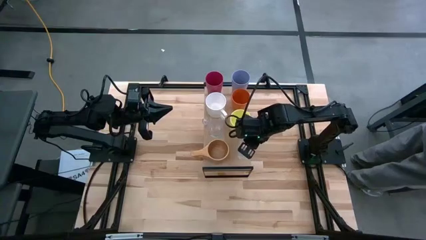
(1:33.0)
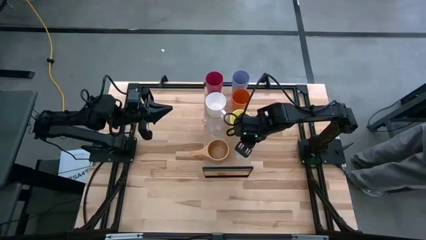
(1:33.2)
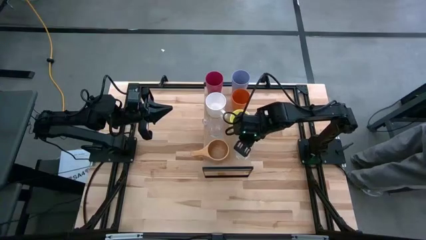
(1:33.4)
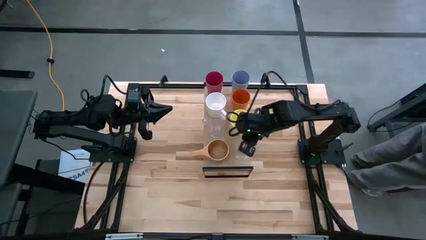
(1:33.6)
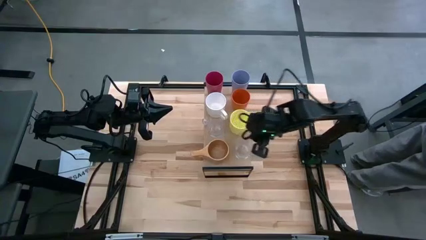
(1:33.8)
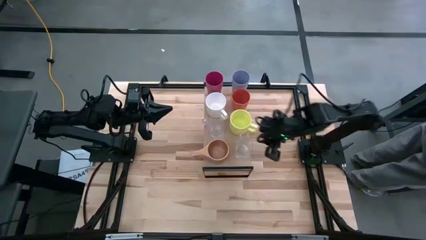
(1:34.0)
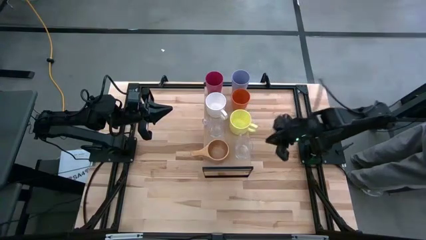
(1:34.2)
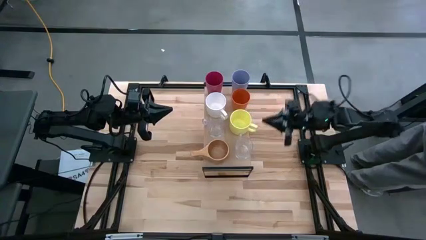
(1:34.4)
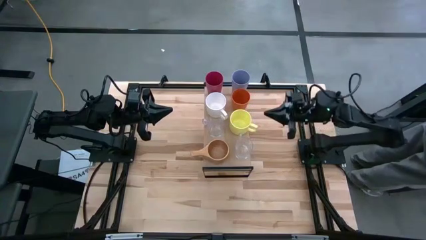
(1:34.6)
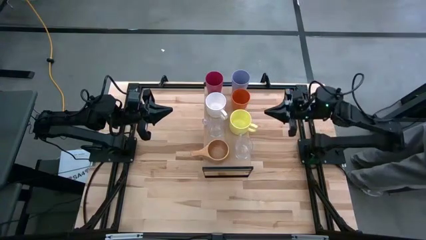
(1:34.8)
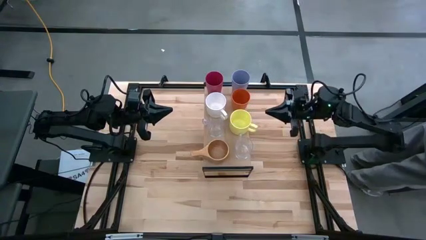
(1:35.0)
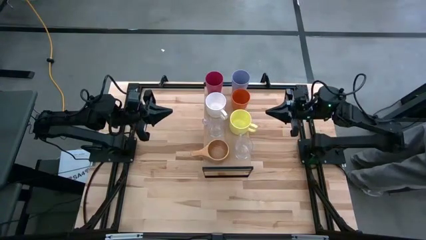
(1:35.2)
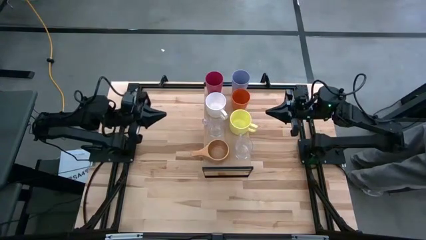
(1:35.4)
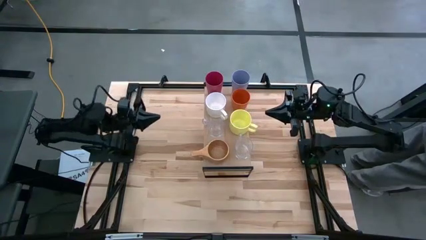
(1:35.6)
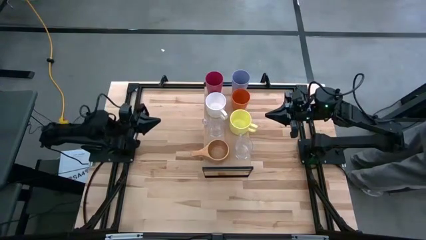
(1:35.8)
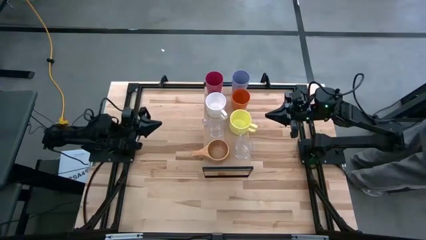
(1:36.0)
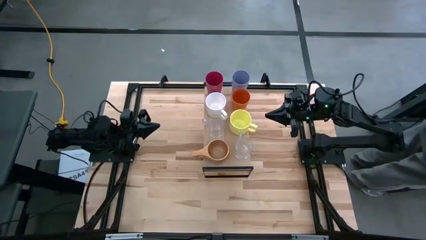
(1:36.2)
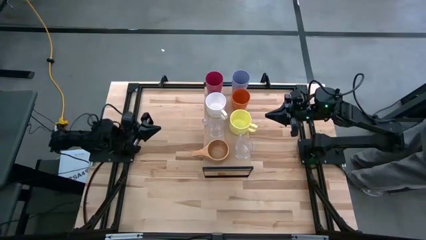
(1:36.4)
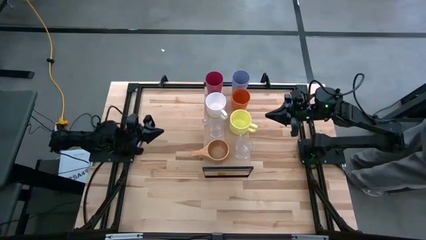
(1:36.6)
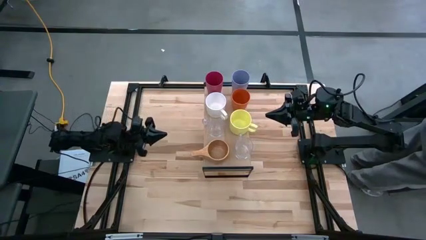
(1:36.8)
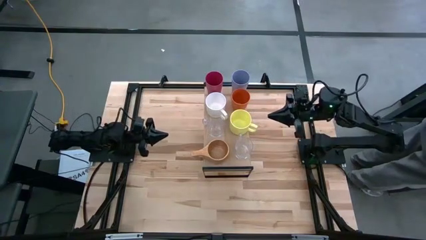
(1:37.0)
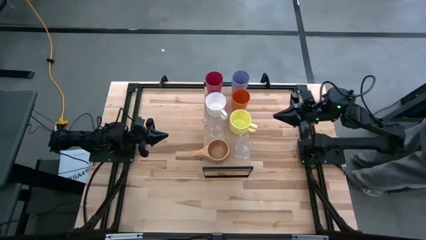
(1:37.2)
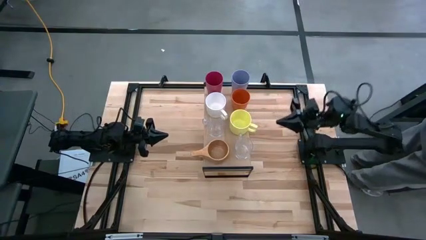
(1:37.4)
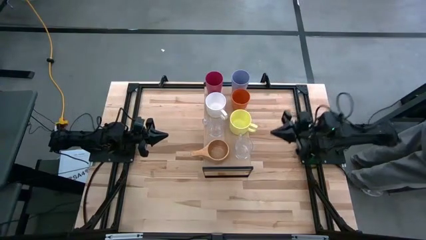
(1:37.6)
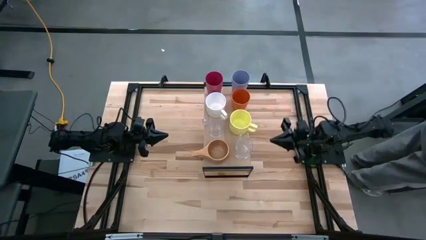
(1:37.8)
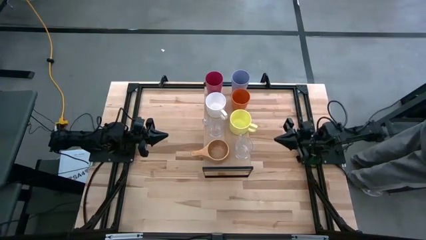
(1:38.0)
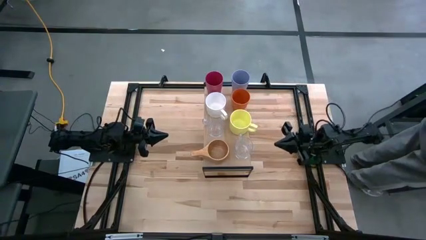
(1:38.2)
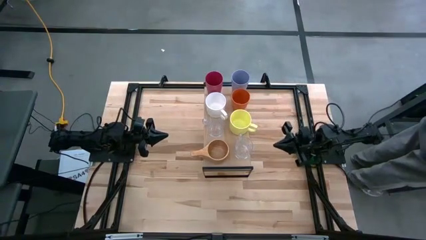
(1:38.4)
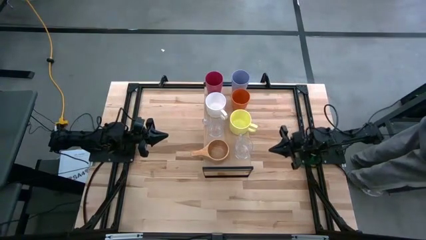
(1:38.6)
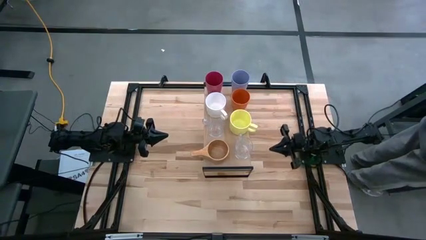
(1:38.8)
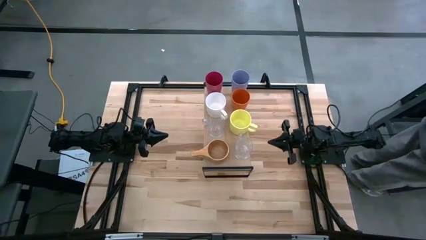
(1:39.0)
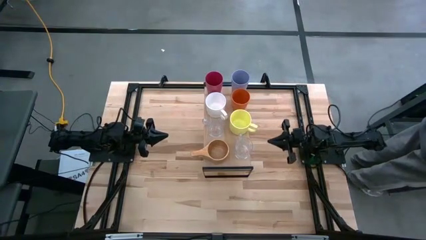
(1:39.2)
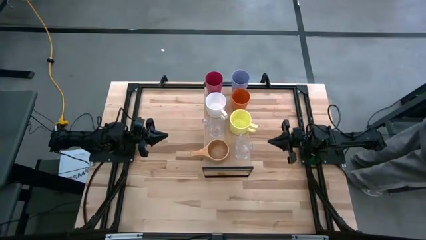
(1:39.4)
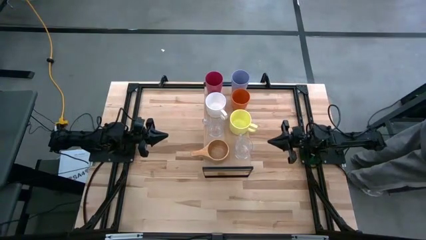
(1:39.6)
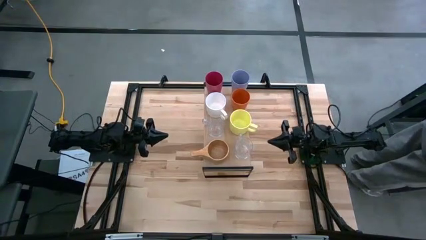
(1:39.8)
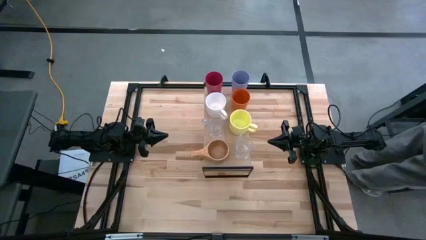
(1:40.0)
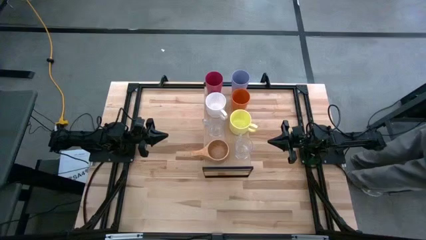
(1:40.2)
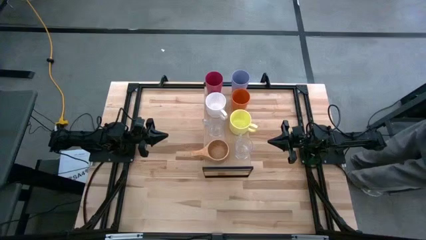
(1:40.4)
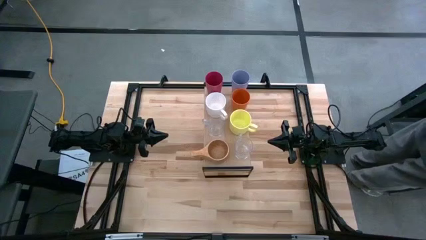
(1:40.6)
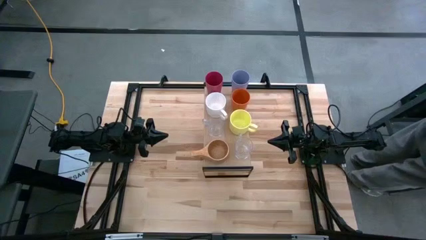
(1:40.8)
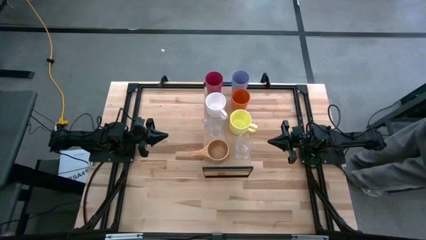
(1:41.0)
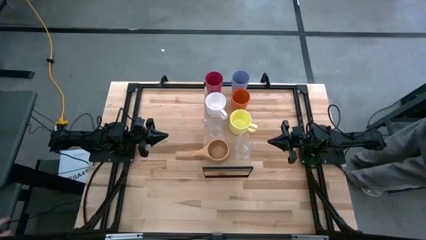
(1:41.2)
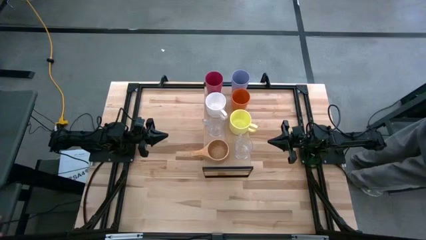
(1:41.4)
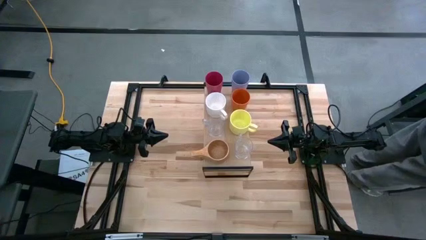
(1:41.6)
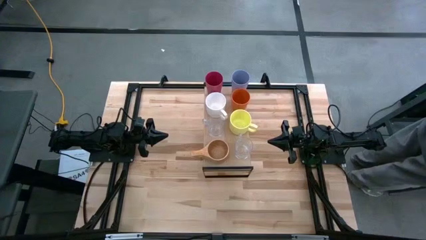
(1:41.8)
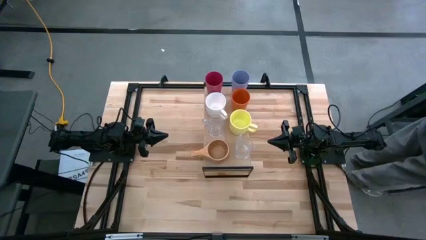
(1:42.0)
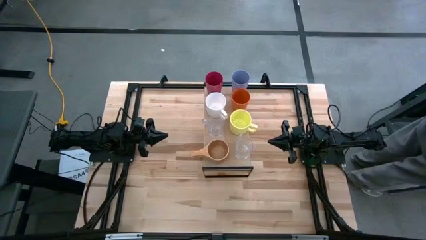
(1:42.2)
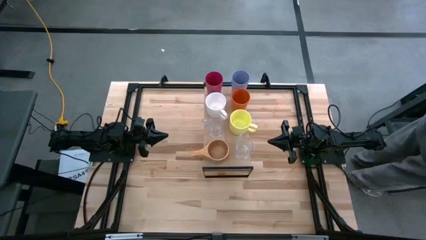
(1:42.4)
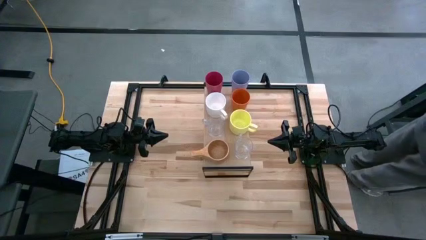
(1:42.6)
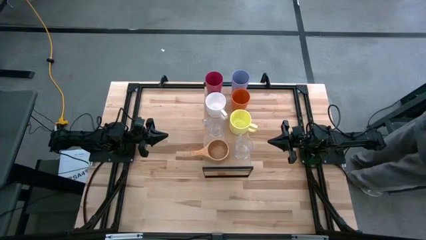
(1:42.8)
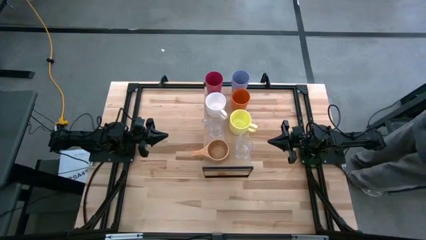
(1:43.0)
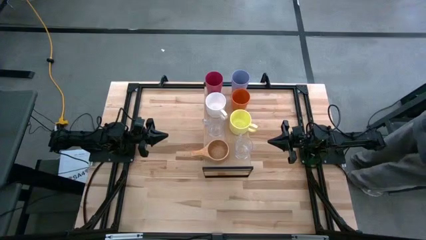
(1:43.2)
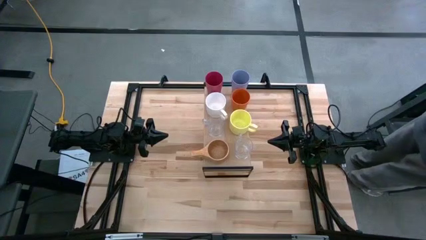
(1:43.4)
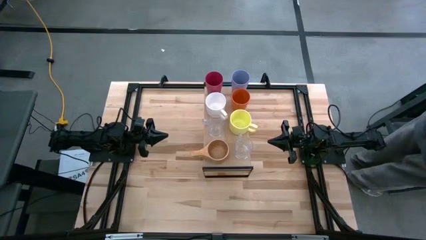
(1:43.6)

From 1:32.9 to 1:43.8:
Task: Stack small to large cups/mugs on shelf
Return to Home Position

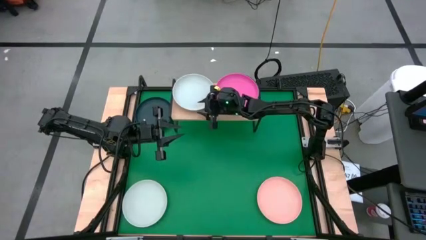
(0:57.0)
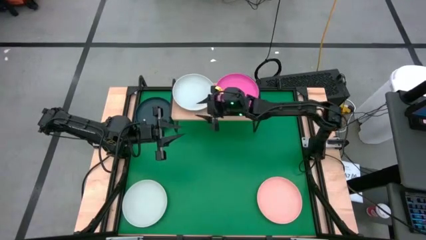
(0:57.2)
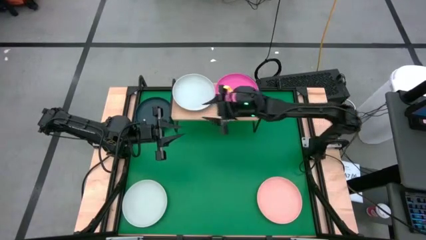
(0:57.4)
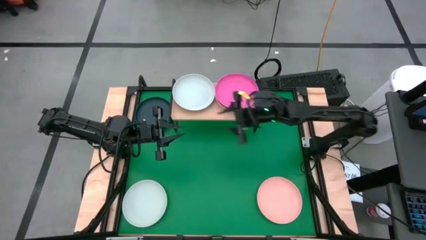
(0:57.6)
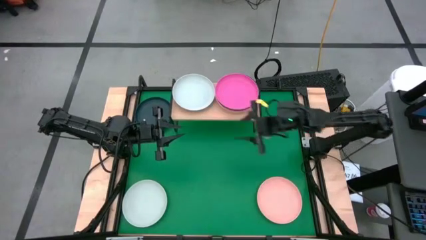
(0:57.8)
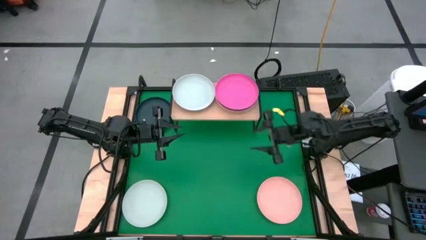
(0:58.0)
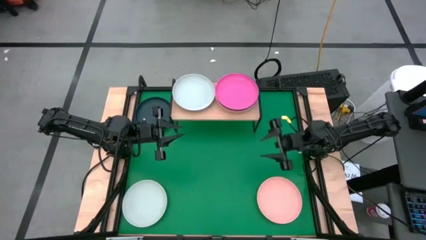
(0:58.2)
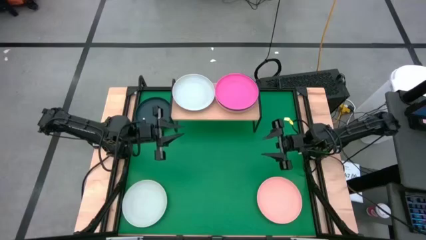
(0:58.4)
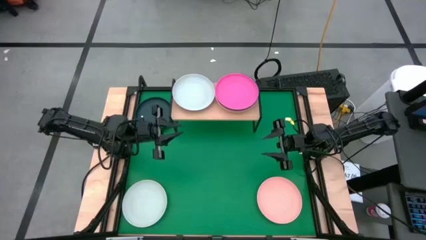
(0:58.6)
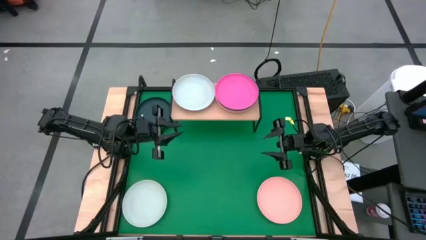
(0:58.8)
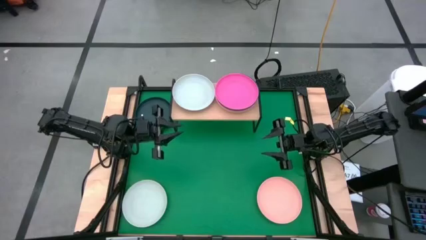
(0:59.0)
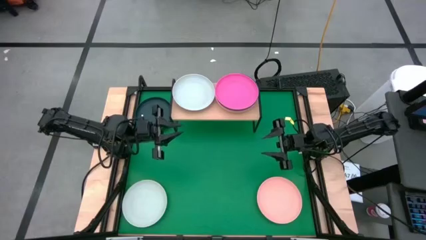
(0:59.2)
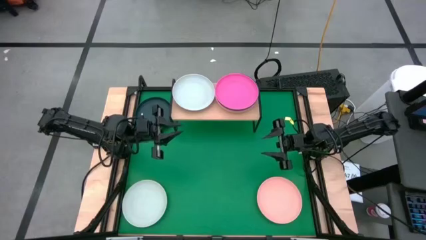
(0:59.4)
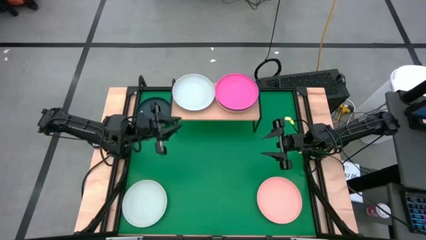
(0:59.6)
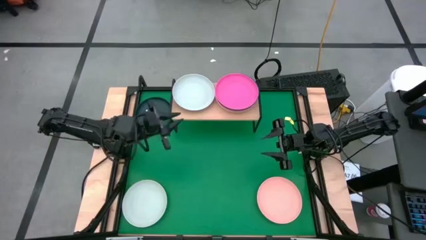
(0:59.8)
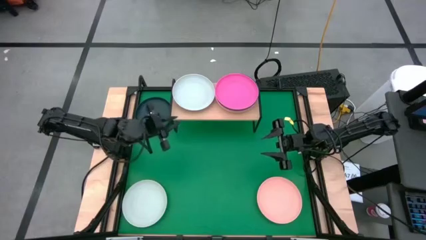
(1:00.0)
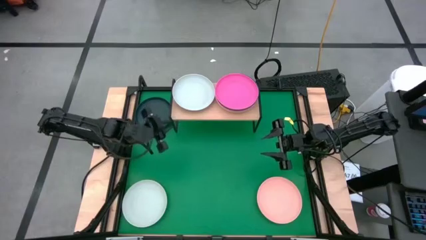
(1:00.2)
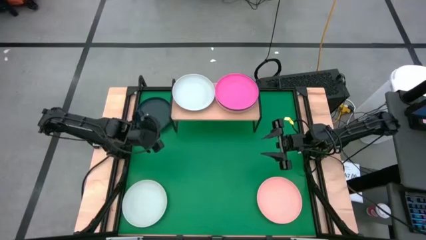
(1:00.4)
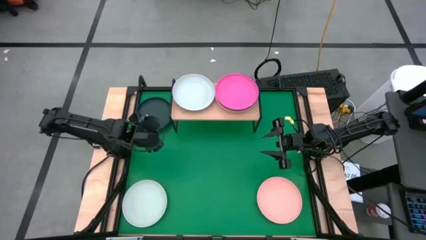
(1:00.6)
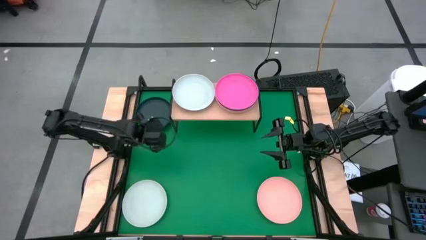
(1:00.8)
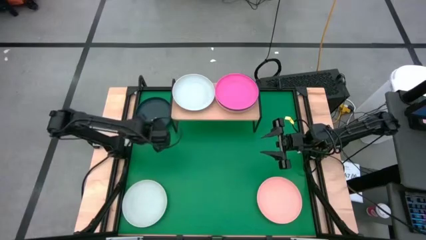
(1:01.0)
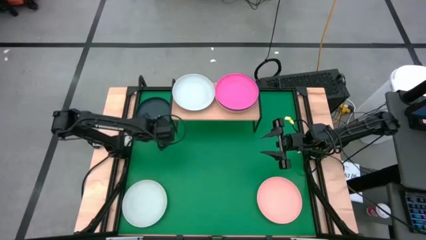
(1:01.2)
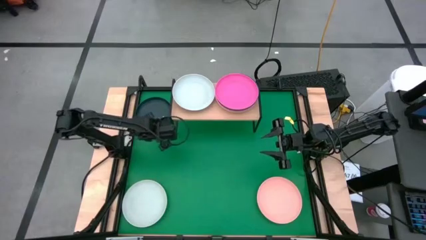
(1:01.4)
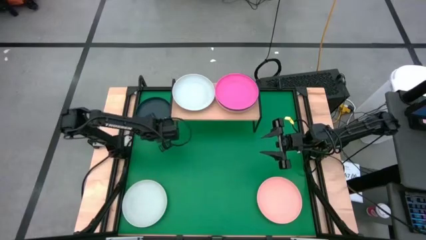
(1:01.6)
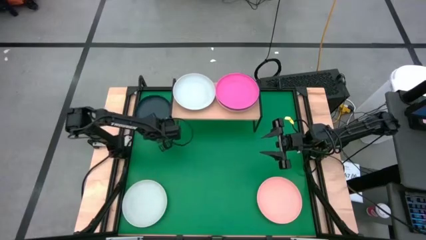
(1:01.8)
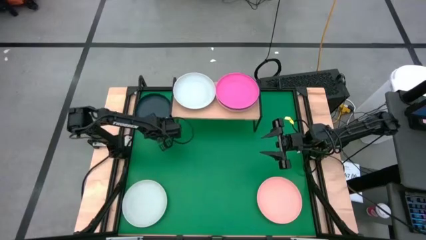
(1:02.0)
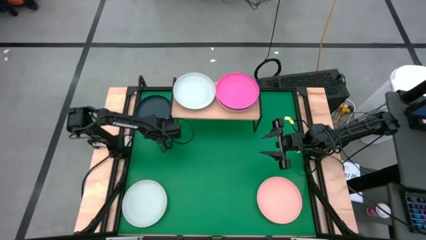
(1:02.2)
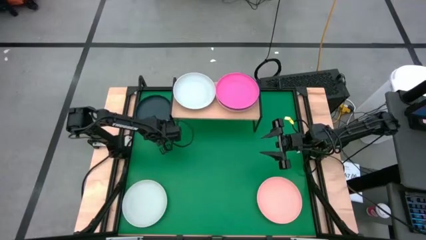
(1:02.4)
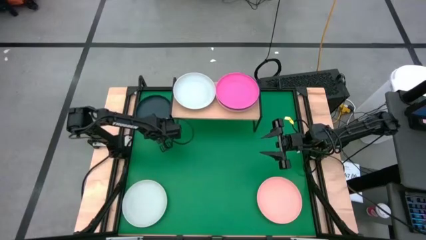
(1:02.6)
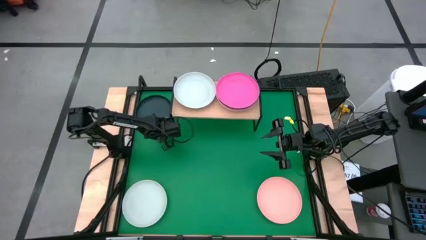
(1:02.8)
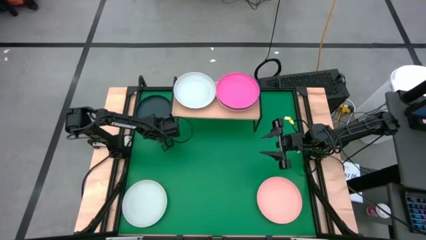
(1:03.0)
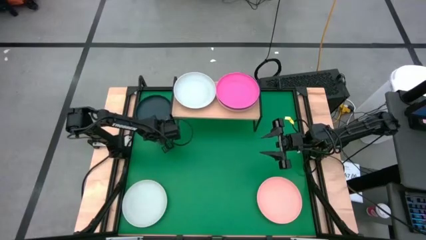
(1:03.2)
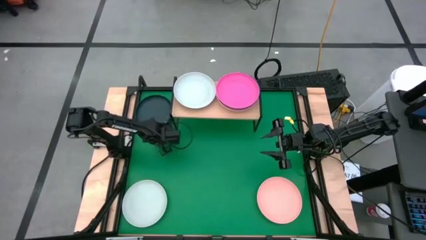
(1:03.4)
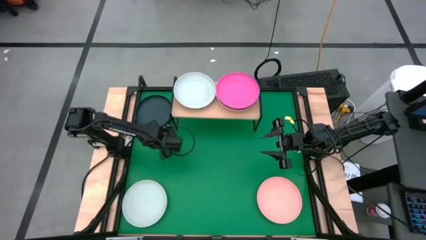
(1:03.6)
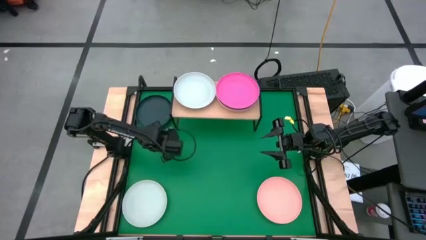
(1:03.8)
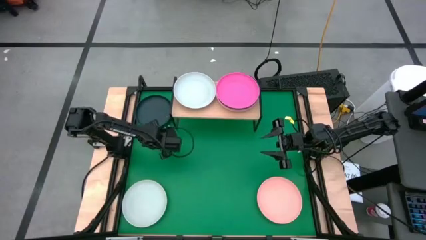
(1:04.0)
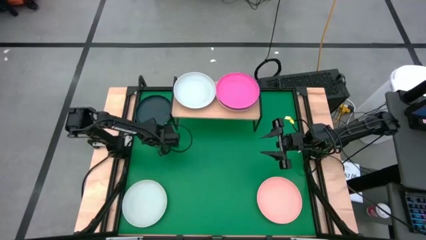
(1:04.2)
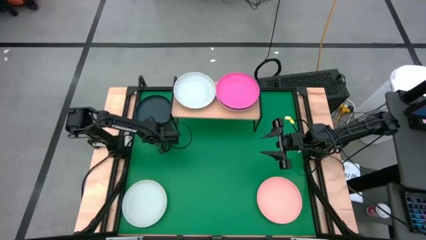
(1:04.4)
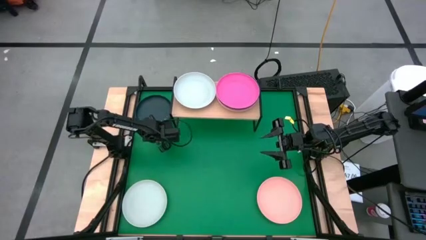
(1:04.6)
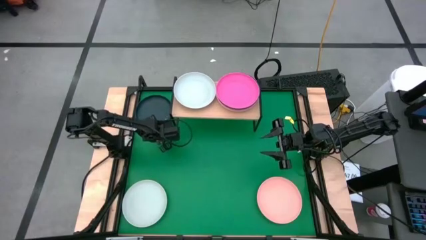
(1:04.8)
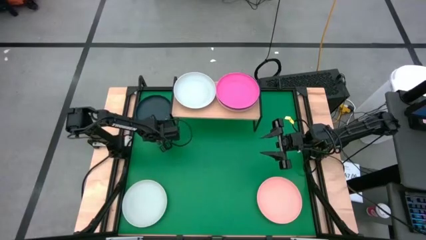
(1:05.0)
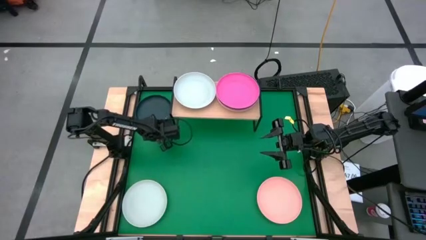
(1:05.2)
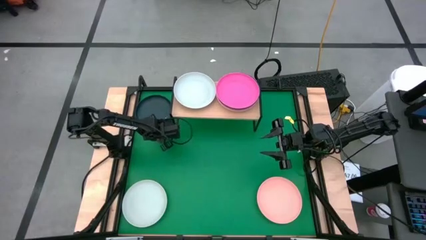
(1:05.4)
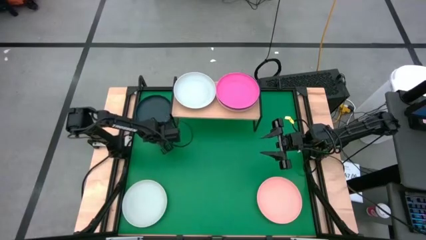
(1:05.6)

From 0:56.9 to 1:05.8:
Task: Place and stack plates onto a shelf
Stack the dark blue plate on top of the white plate on the shelf
